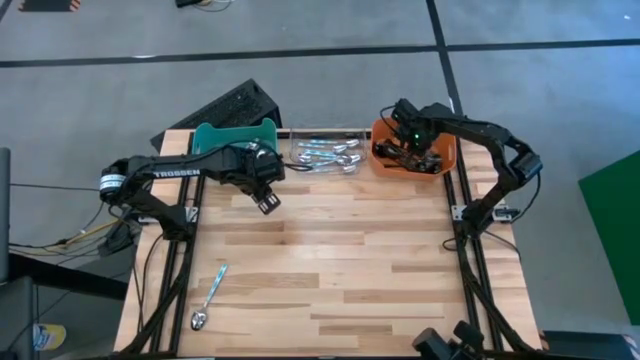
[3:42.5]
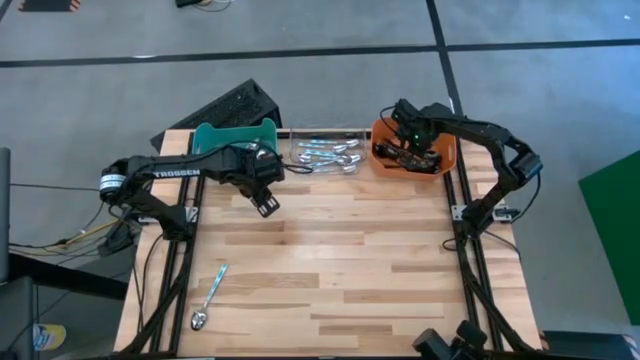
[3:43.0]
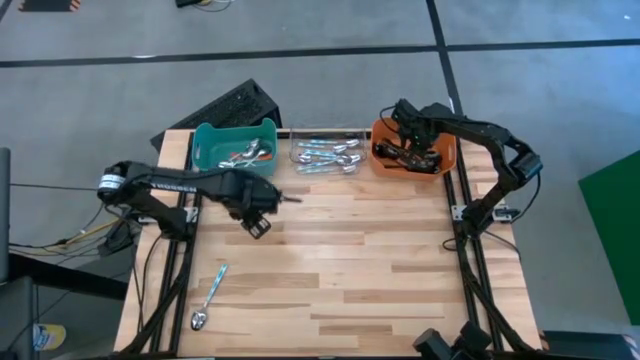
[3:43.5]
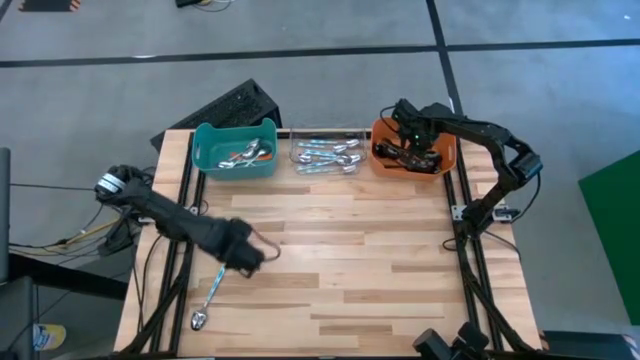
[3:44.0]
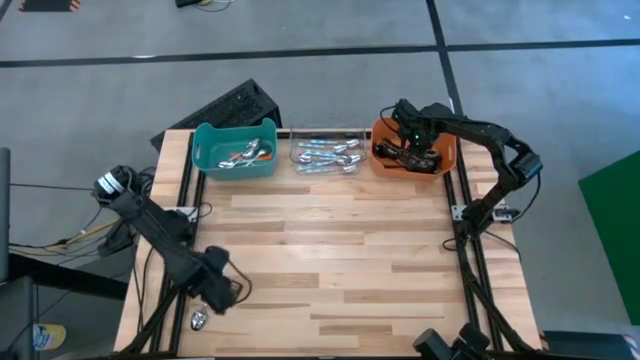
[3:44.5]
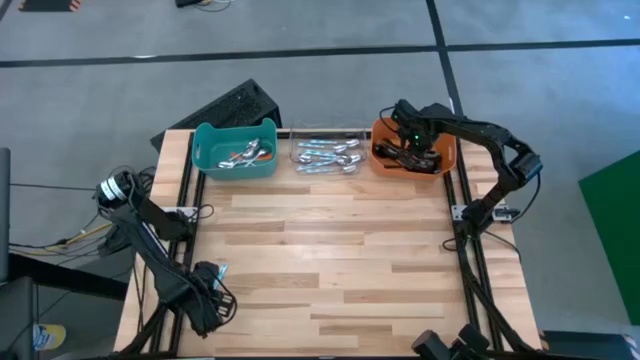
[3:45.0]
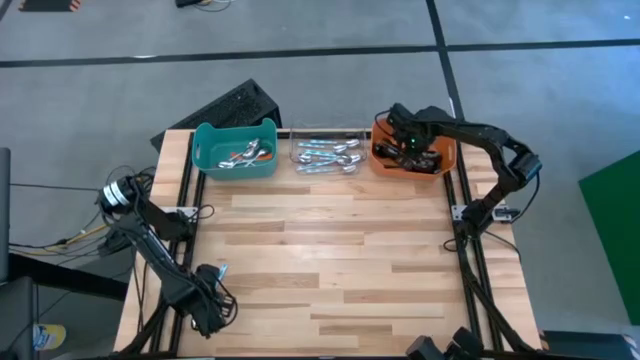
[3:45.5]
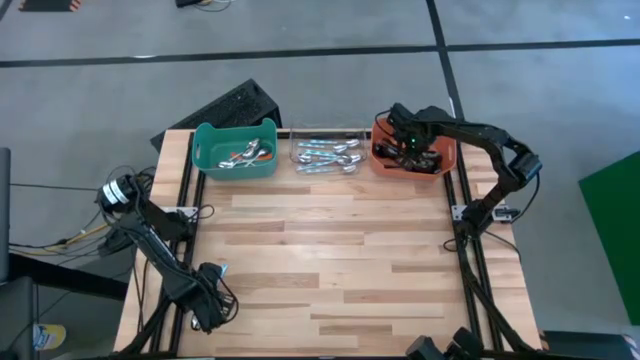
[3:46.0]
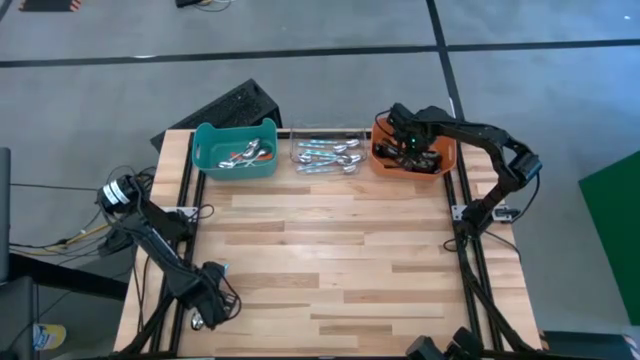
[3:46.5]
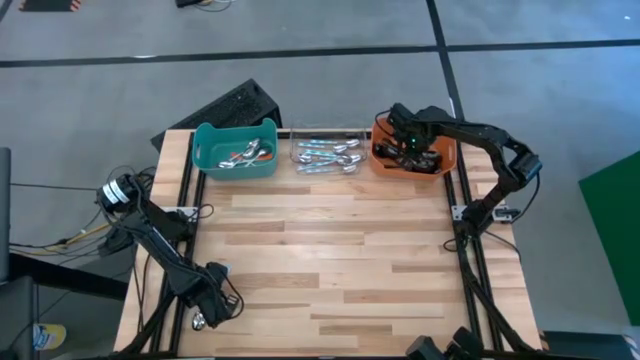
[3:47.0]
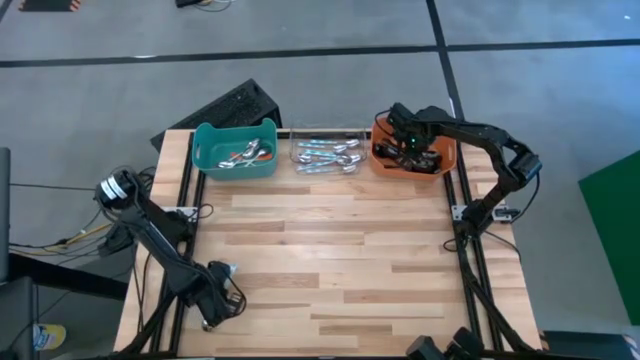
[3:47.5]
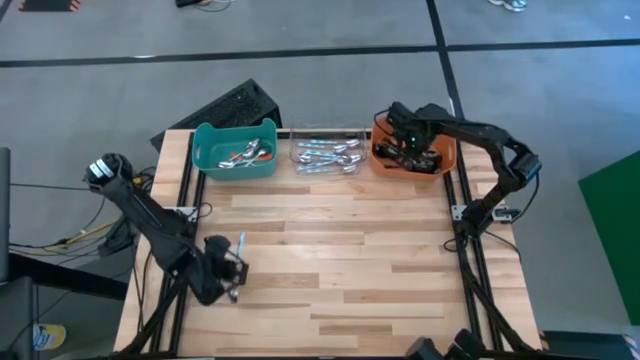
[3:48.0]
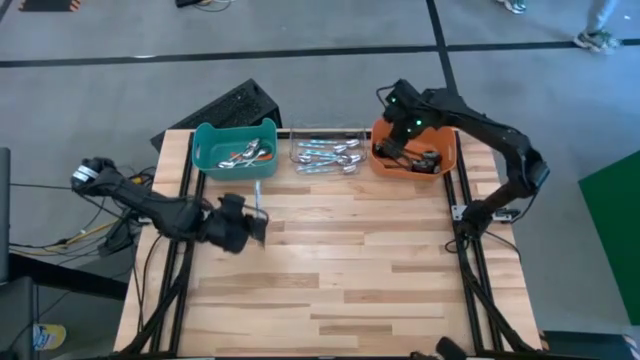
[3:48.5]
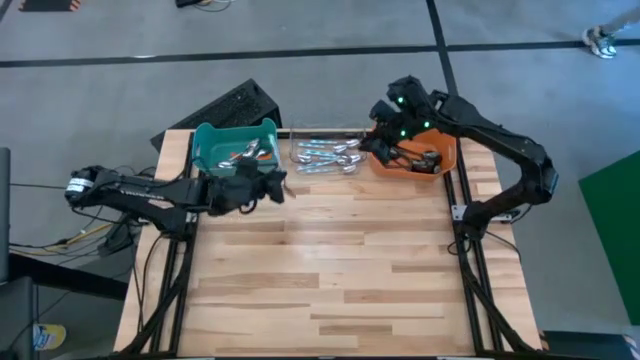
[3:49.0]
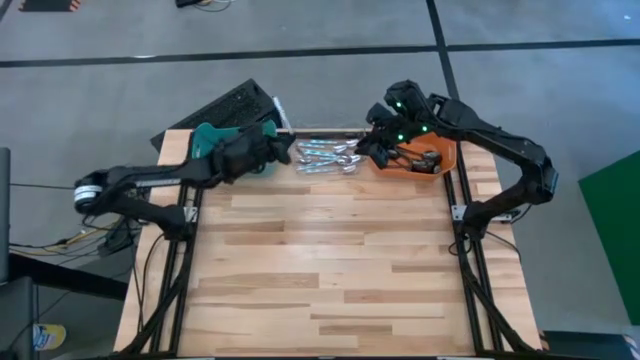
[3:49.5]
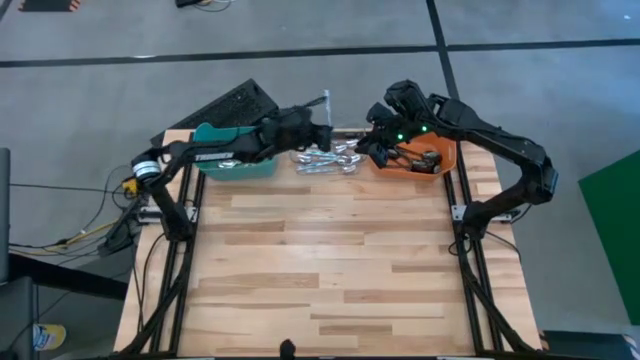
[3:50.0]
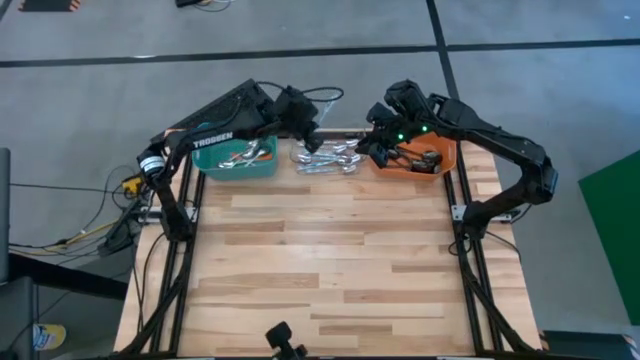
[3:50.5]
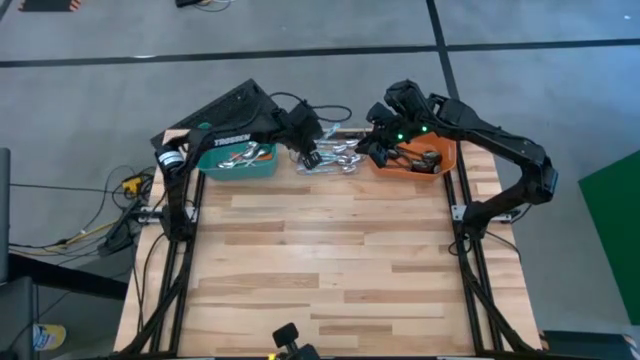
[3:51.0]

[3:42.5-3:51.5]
Task: Sort silverware by color (type)
Put the blue spoon into the transparent bin

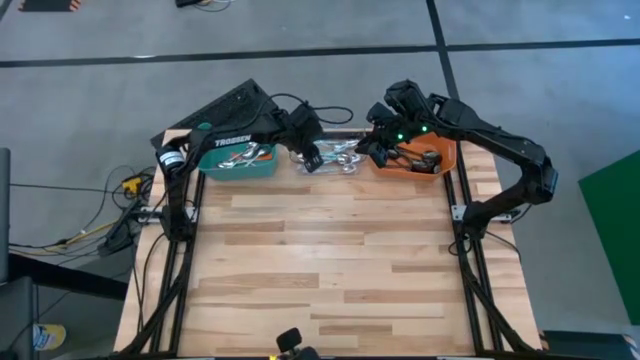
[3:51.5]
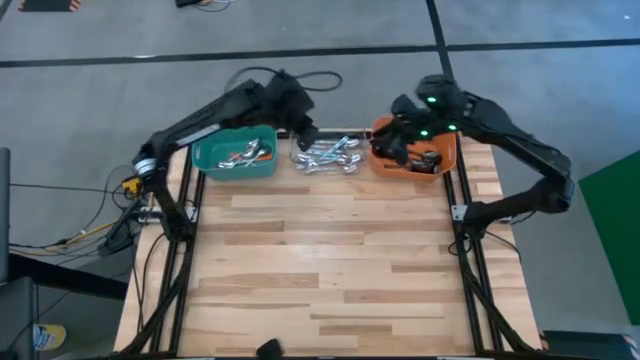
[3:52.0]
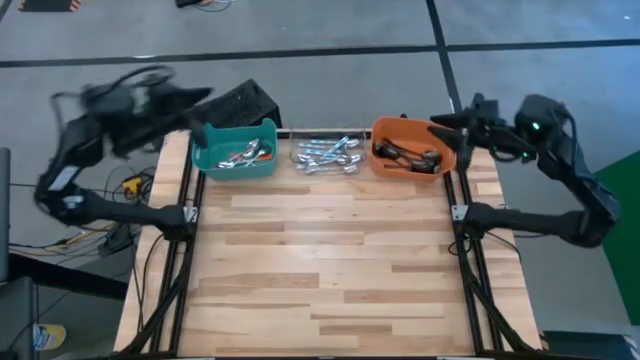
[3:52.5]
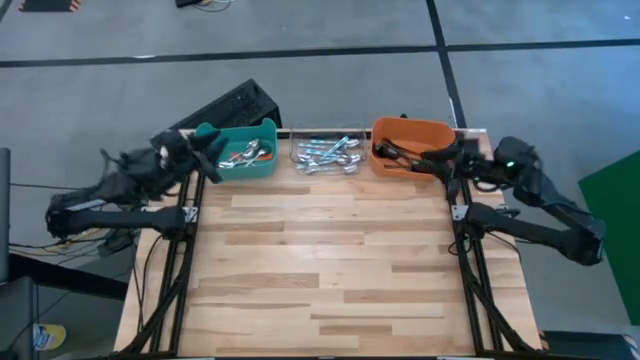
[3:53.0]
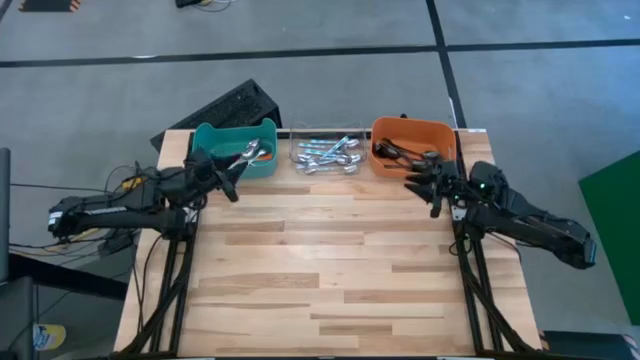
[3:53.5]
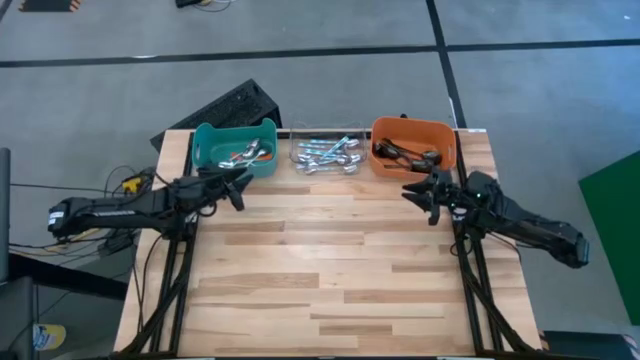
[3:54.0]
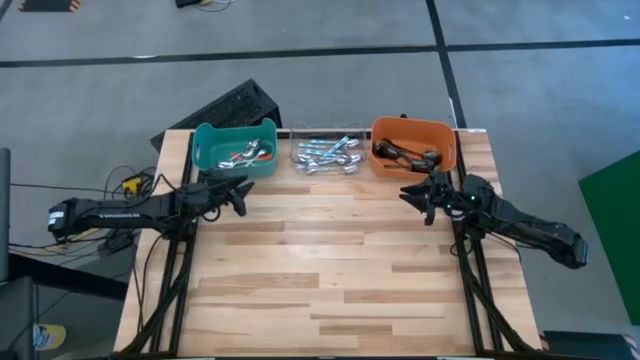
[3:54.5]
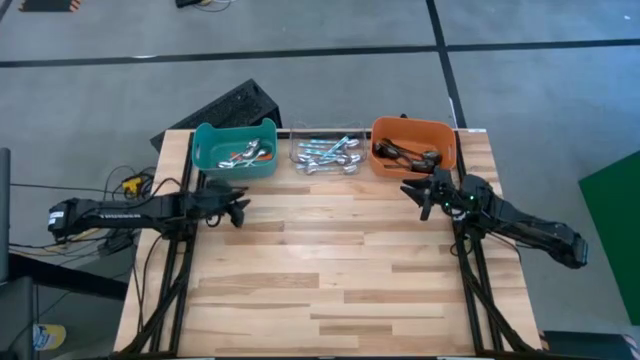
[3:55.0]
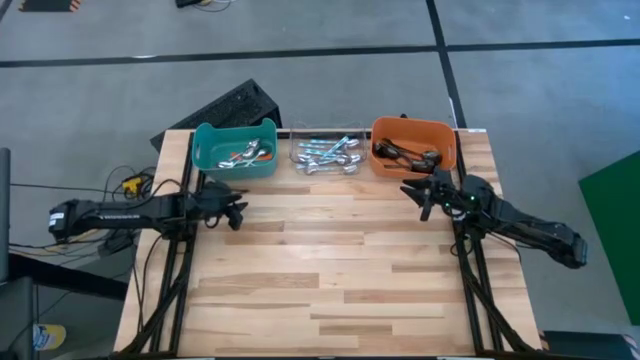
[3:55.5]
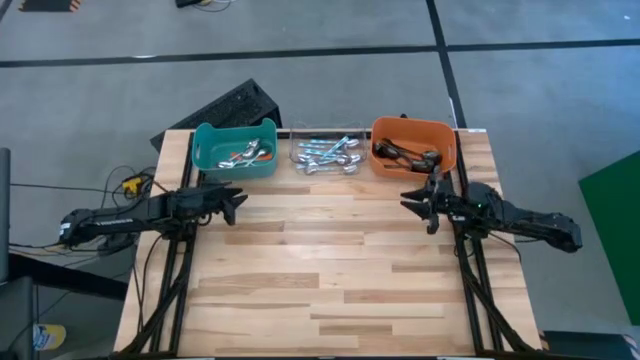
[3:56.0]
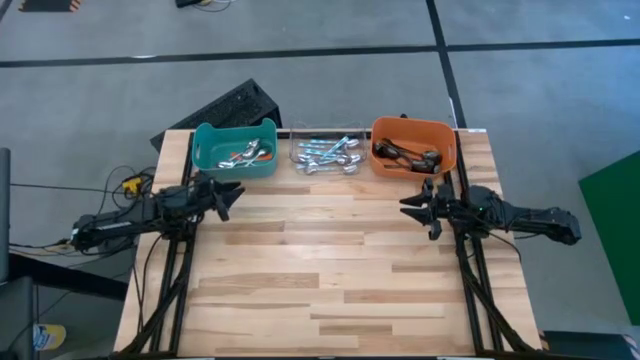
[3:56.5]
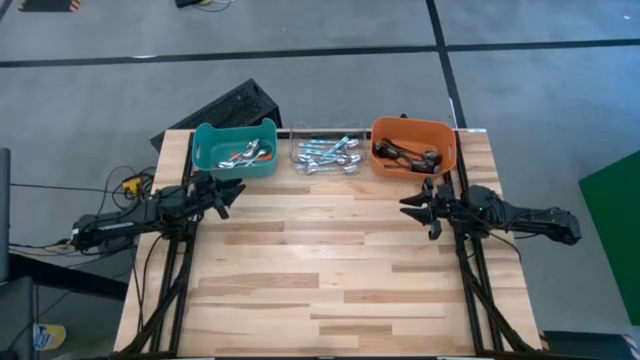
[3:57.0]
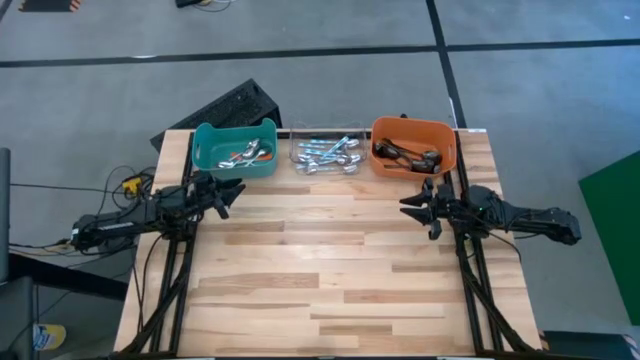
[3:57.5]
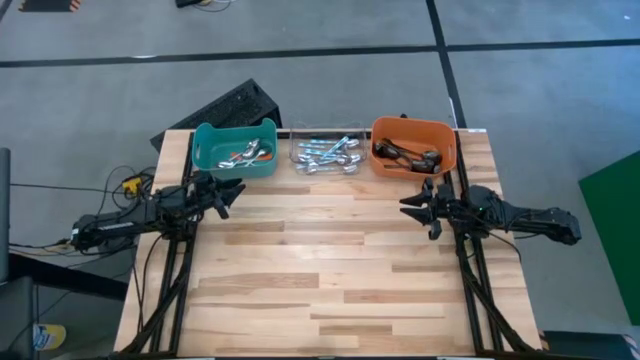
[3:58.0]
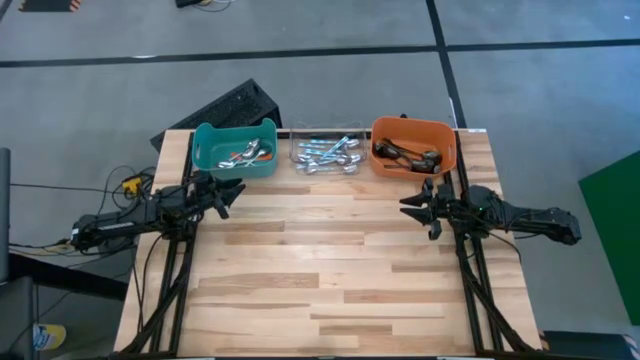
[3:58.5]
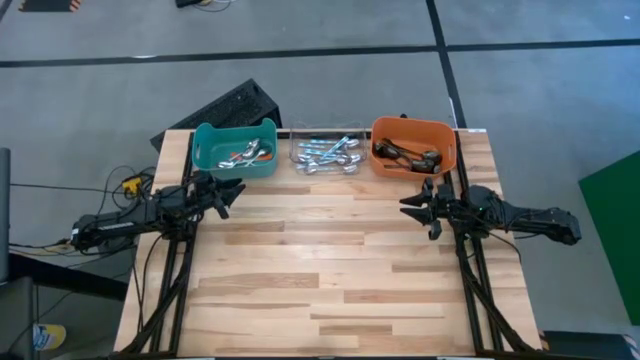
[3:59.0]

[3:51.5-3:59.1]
Return to Home Position

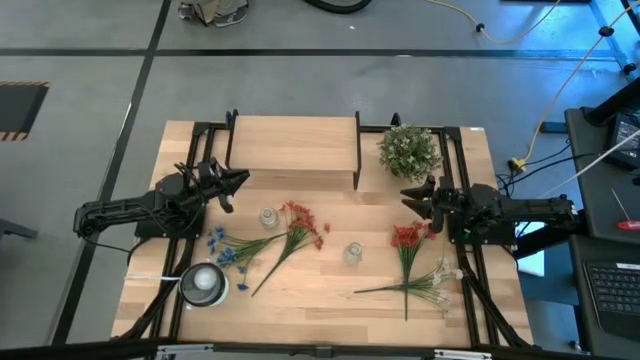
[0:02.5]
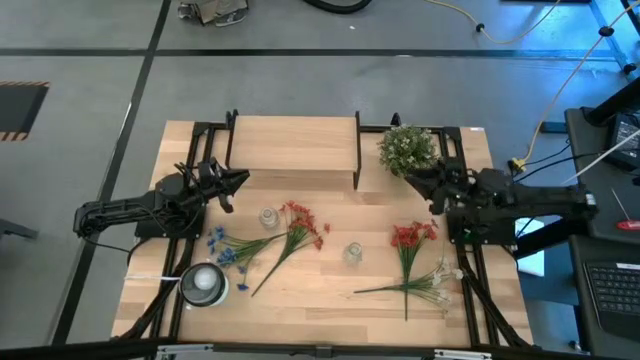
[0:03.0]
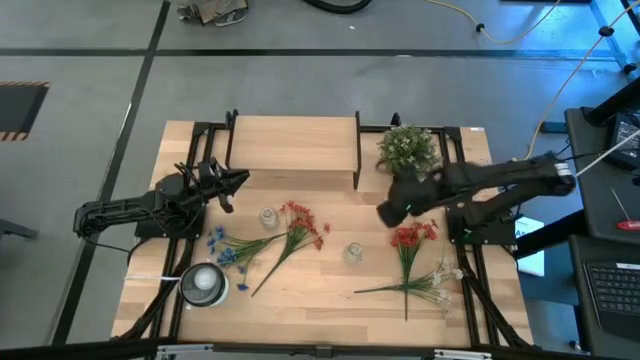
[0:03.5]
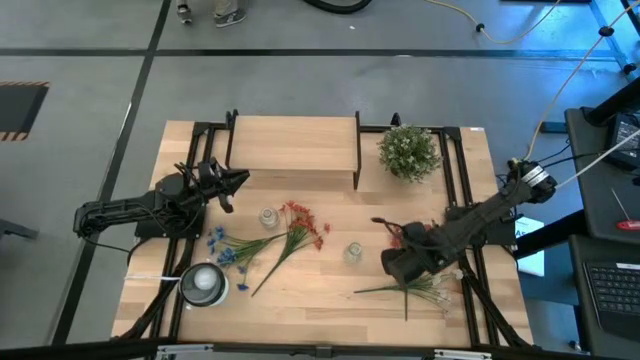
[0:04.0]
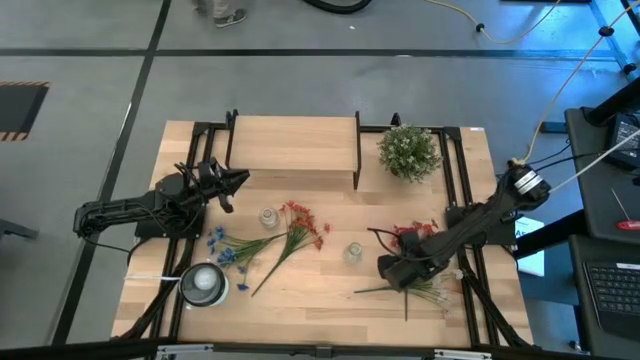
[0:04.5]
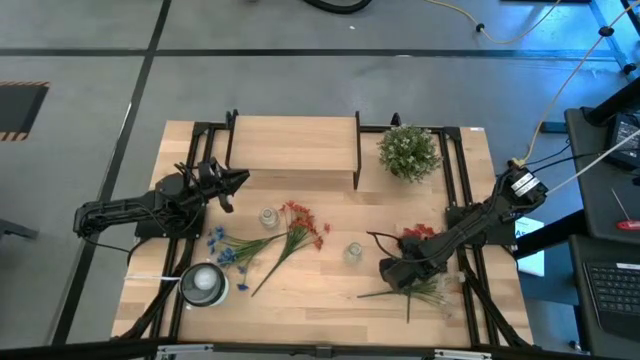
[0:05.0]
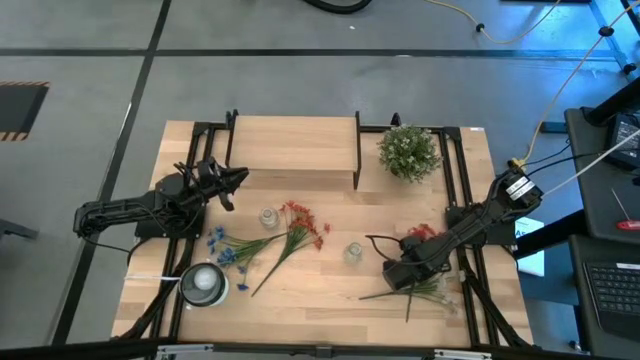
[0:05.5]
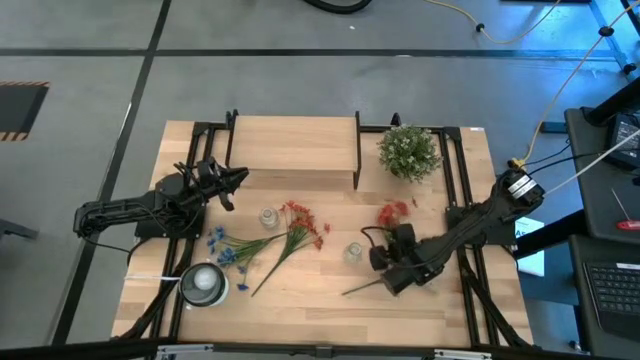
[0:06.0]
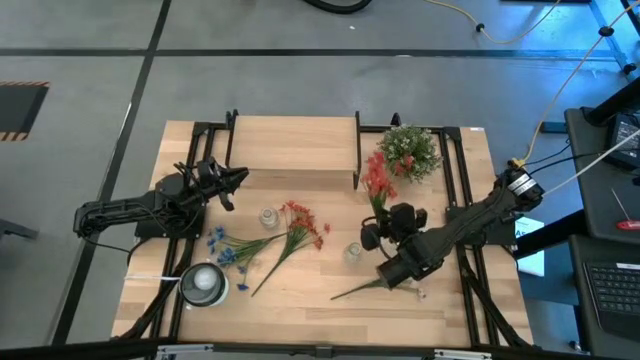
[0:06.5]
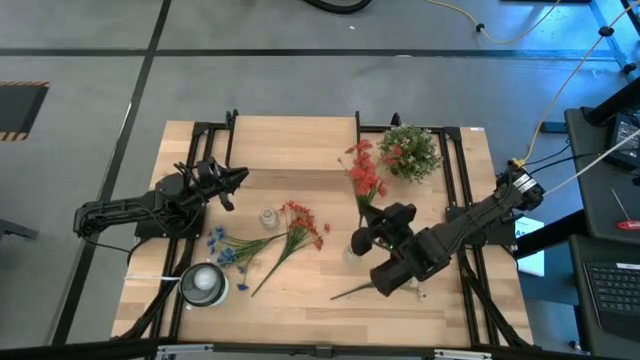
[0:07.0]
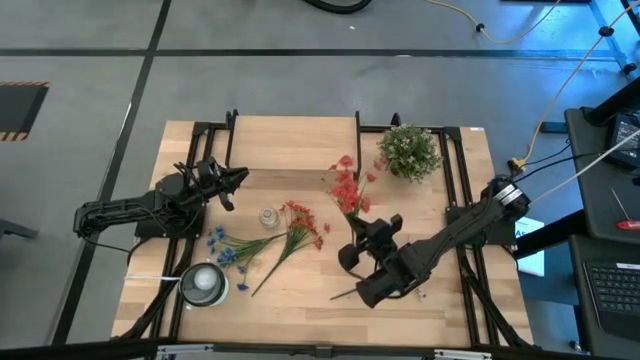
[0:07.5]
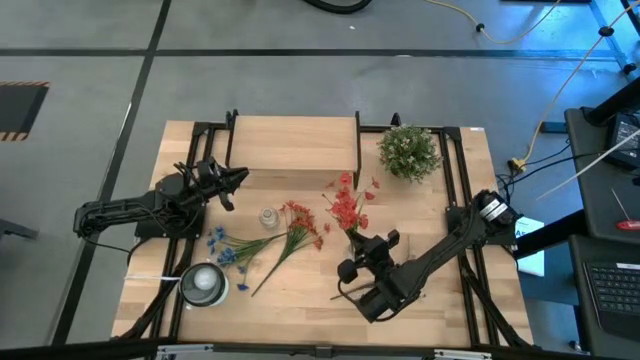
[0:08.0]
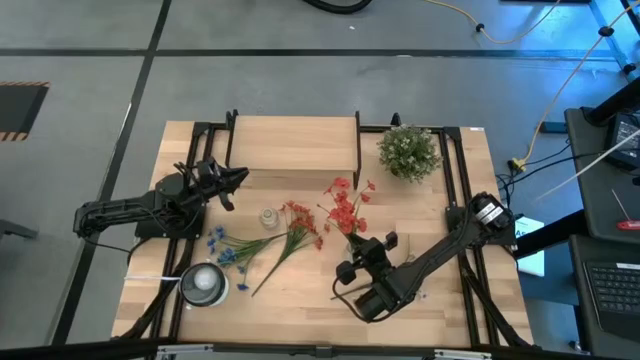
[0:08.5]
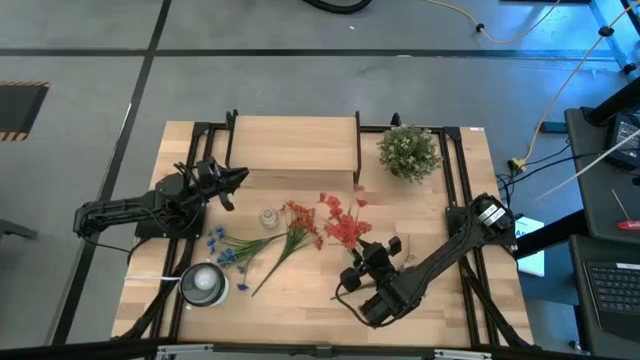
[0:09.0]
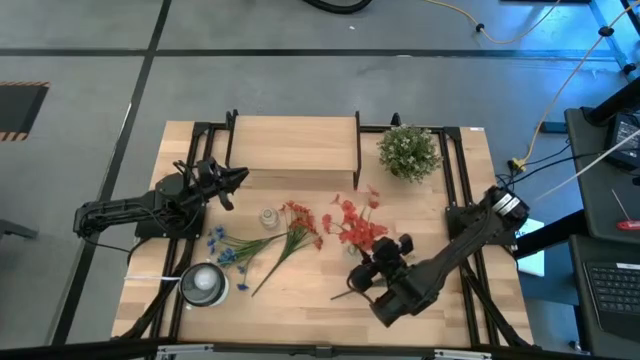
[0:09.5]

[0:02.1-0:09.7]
Task: Pick and place flowers into a vace then onto a shelf
Put the right orange flowers into the right transparent vase
